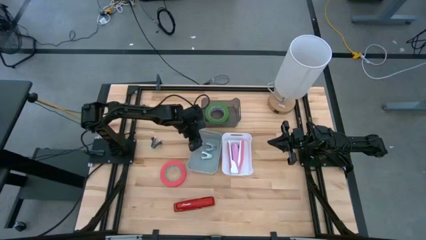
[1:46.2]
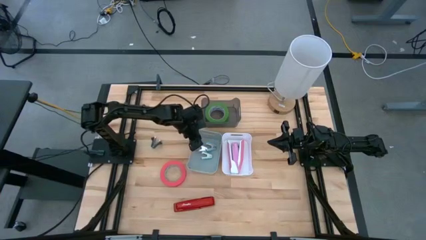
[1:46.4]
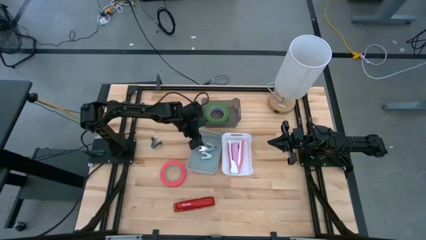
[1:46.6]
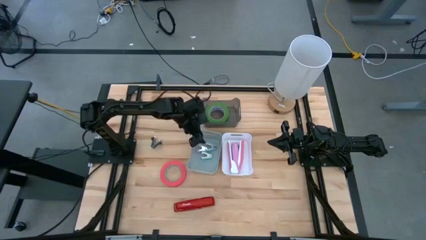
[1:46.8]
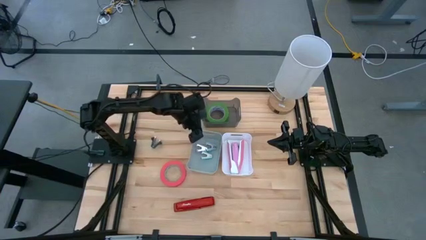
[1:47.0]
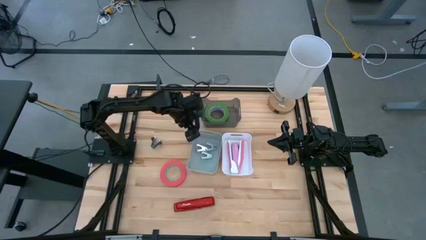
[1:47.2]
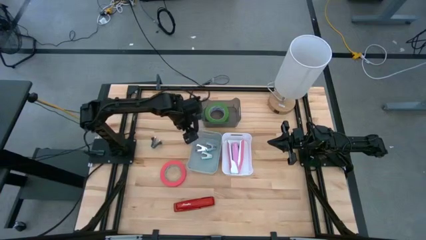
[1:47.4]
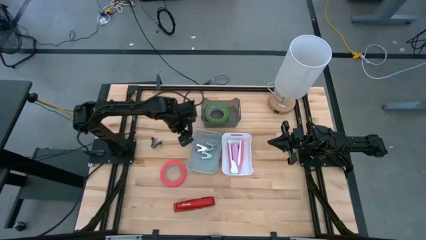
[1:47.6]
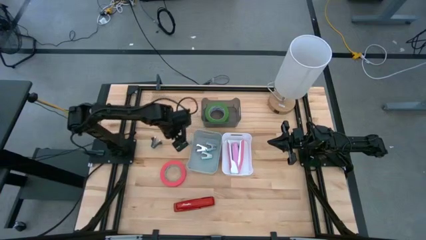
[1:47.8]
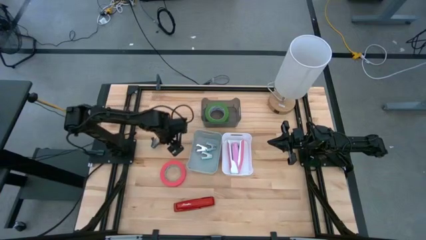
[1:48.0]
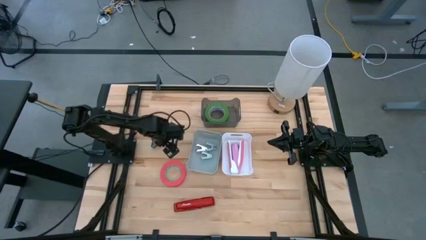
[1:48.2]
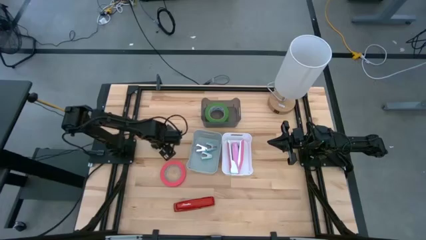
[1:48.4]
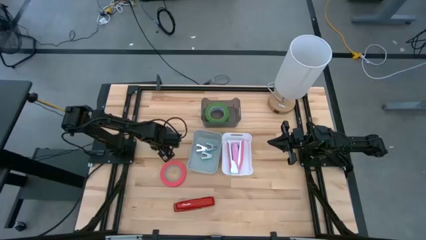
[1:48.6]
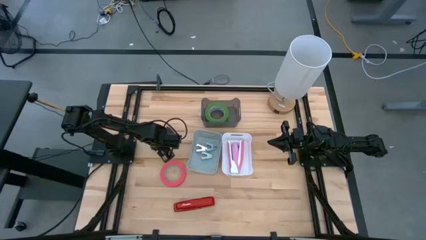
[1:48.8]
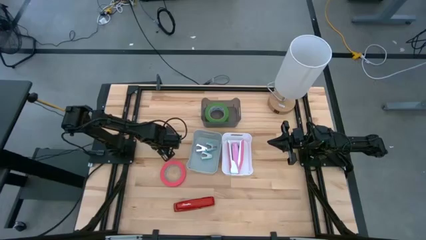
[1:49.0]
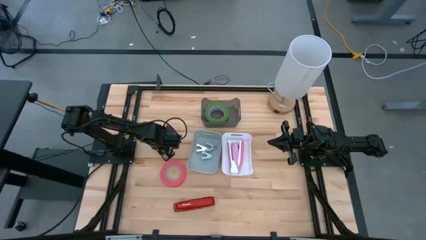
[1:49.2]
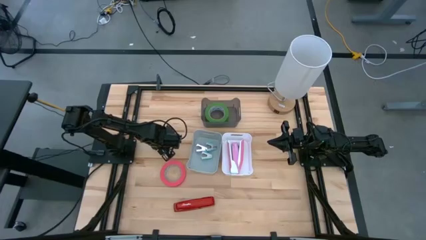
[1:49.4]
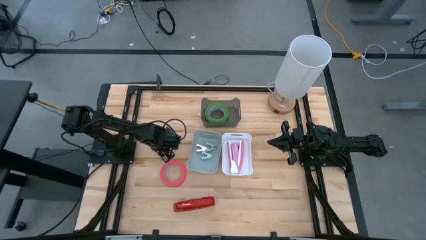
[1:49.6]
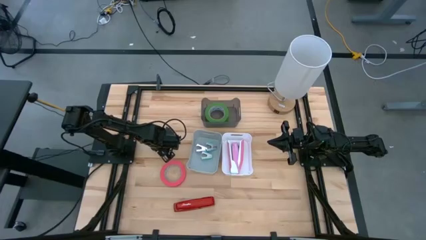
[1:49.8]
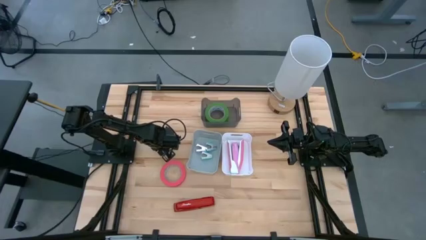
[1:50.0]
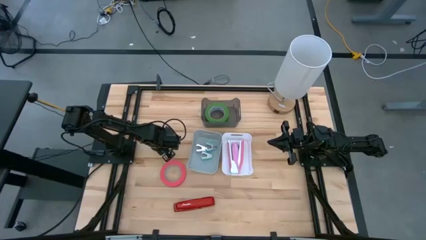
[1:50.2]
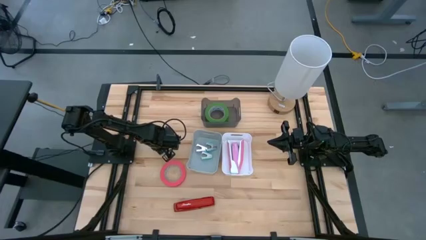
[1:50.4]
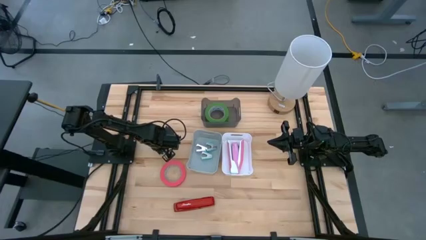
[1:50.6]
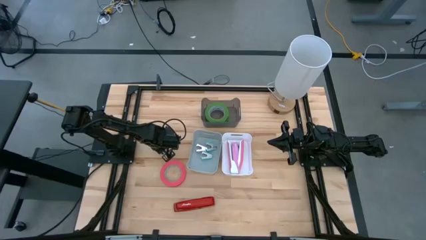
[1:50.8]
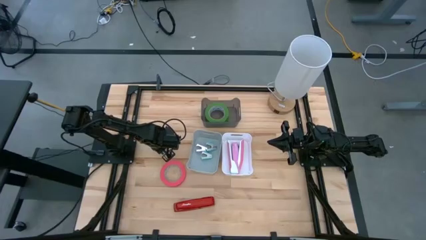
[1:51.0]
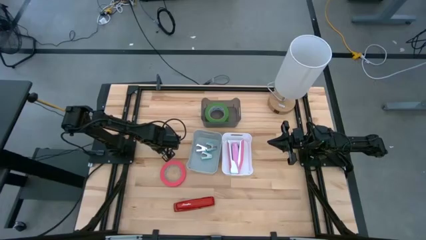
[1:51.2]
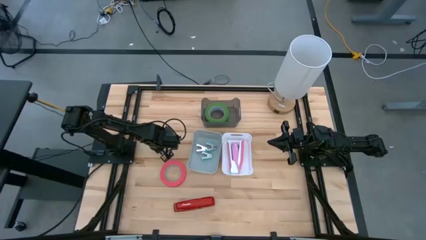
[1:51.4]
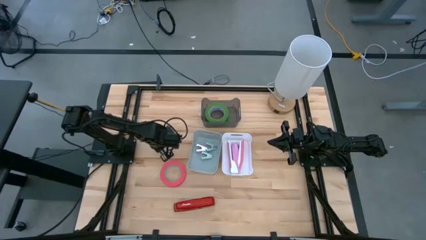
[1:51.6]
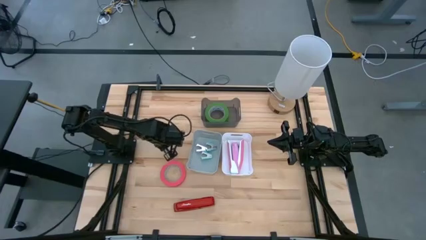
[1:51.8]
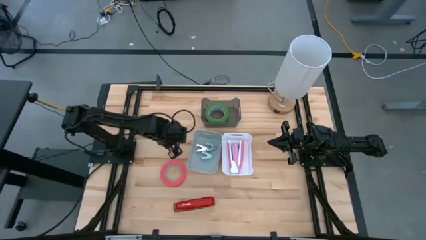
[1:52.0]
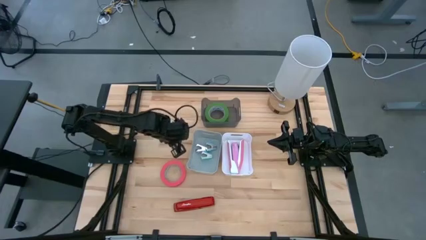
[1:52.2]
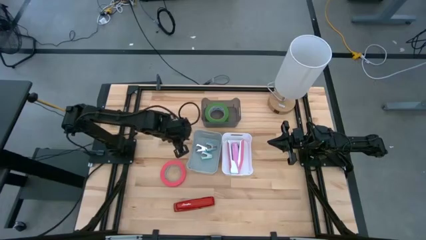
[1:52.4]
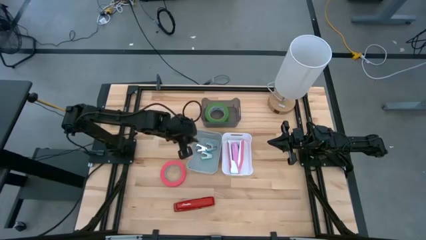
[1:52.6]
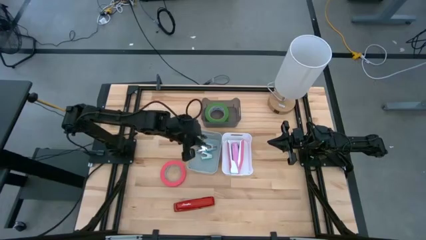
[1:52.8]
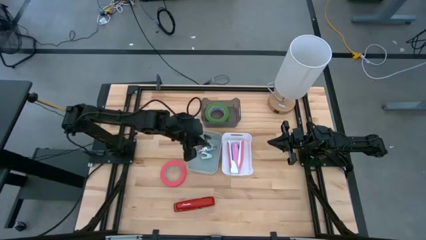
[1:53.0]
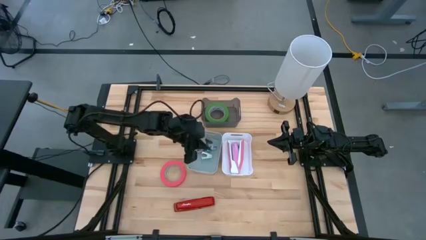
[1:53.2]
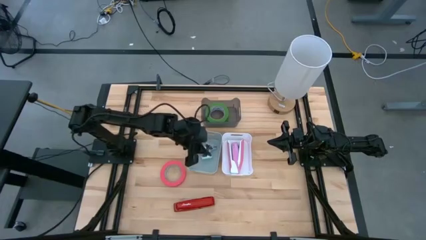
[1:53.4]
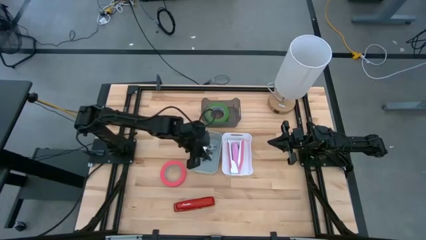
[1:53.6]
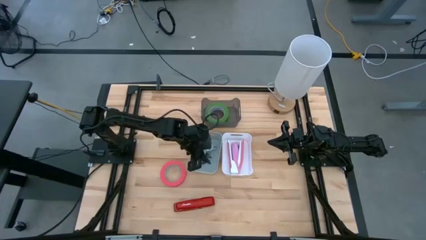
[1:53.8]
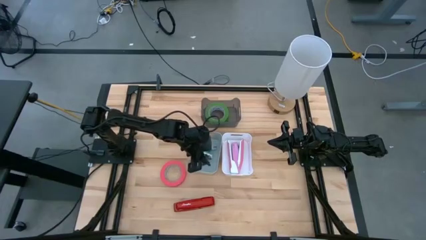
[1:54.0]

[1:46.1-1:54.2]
Task: Pick and place Stapler, Stapler remover, tape
Put the black staple remover in the gray bin

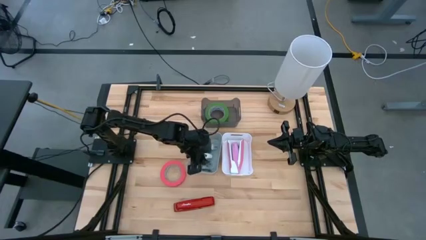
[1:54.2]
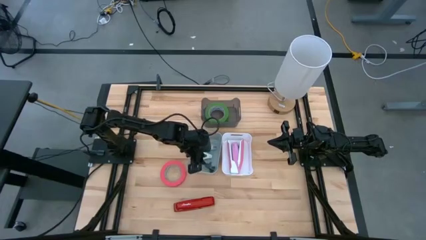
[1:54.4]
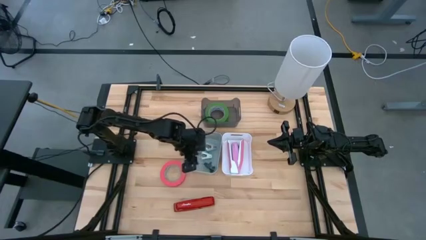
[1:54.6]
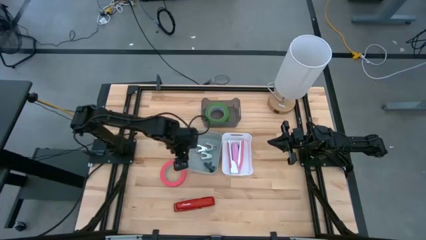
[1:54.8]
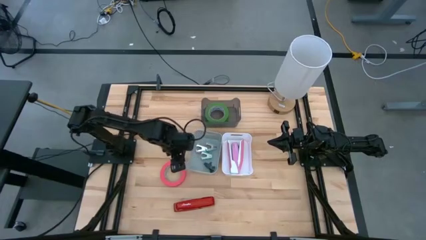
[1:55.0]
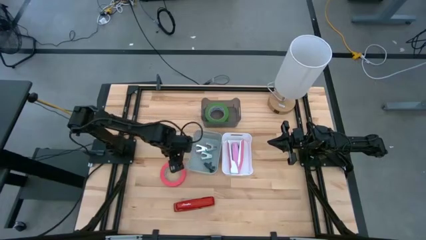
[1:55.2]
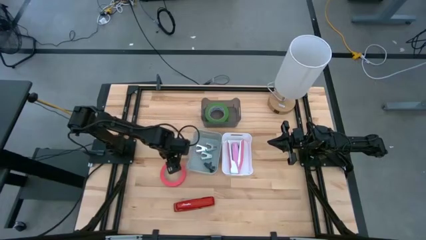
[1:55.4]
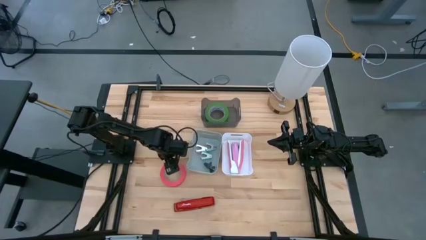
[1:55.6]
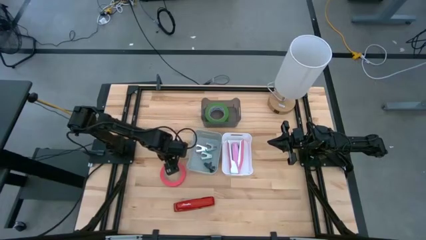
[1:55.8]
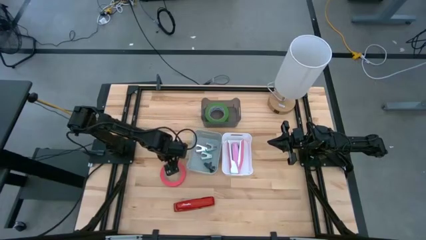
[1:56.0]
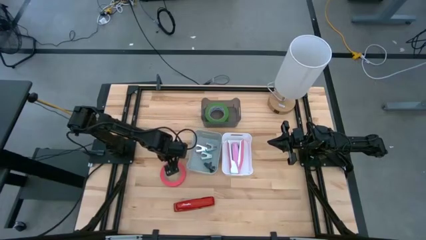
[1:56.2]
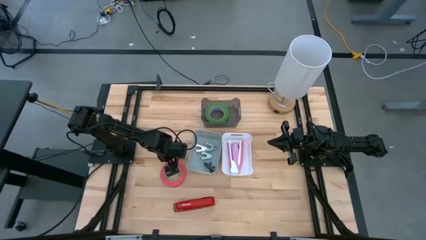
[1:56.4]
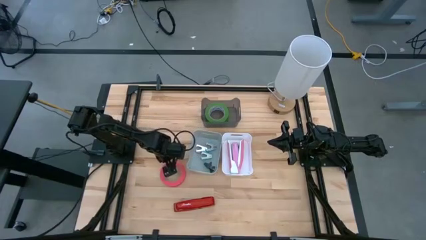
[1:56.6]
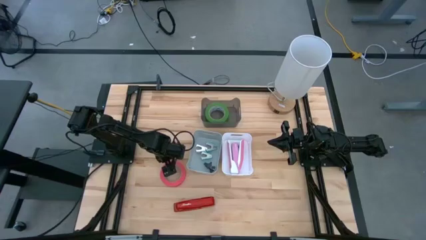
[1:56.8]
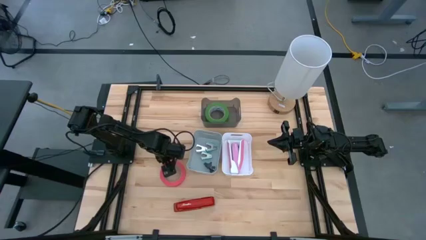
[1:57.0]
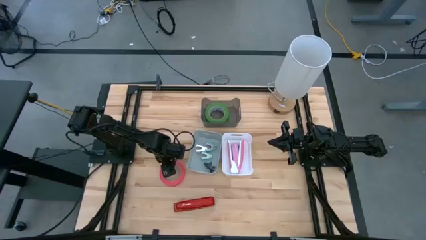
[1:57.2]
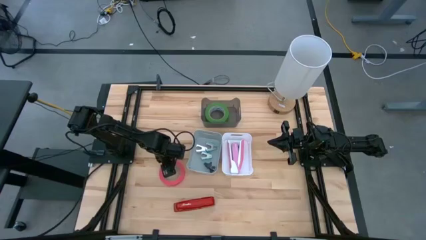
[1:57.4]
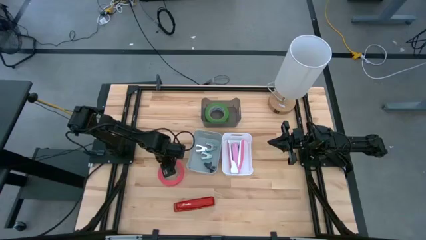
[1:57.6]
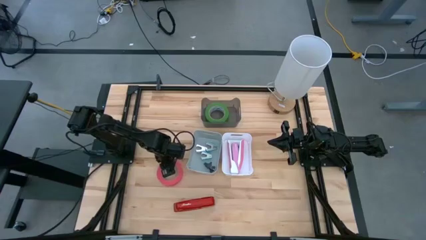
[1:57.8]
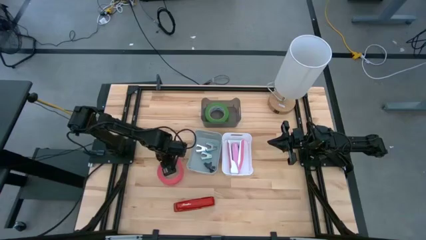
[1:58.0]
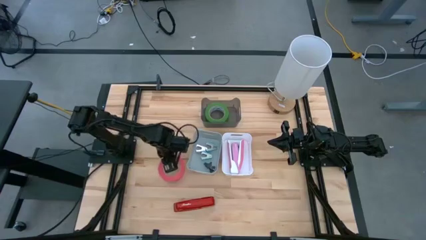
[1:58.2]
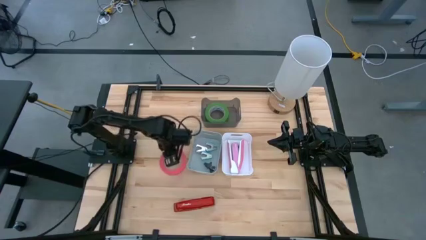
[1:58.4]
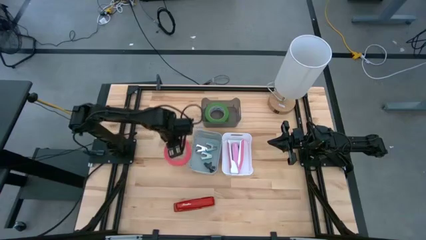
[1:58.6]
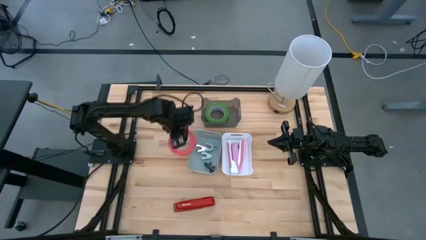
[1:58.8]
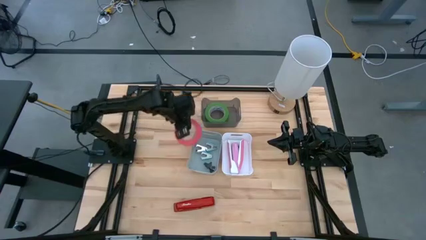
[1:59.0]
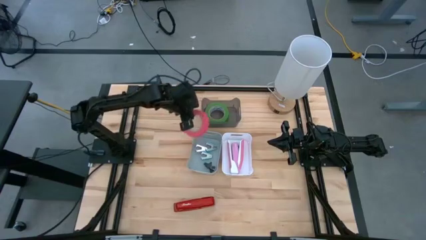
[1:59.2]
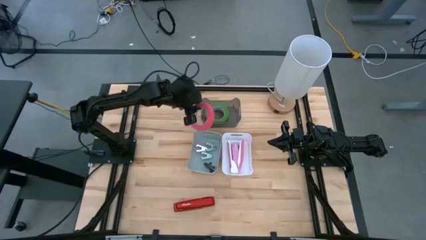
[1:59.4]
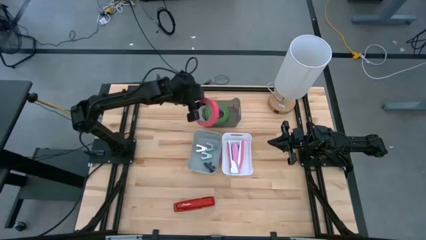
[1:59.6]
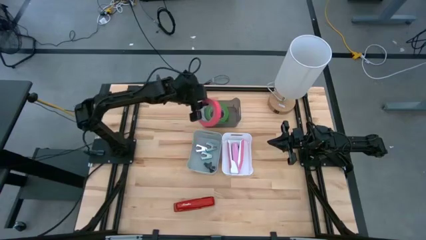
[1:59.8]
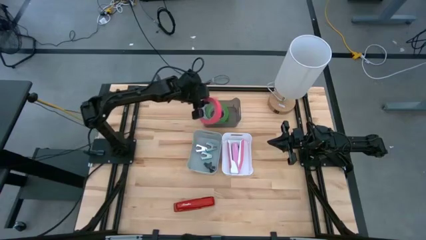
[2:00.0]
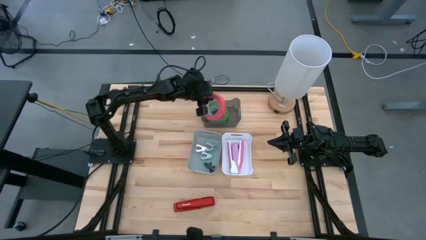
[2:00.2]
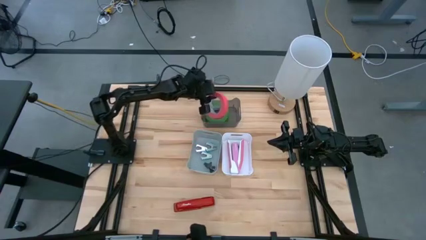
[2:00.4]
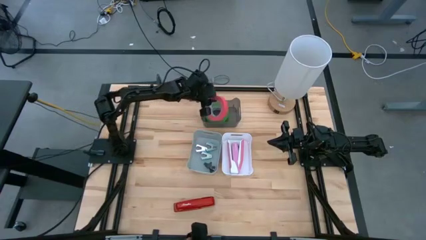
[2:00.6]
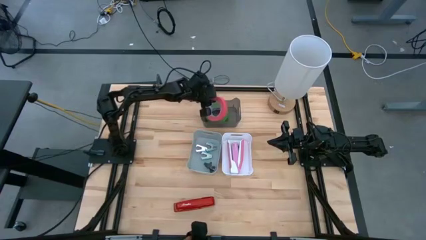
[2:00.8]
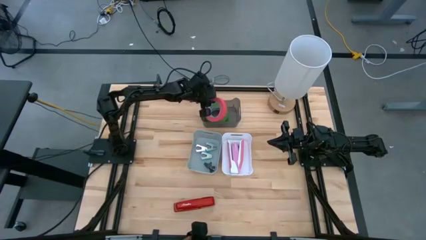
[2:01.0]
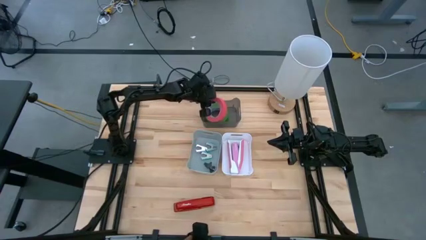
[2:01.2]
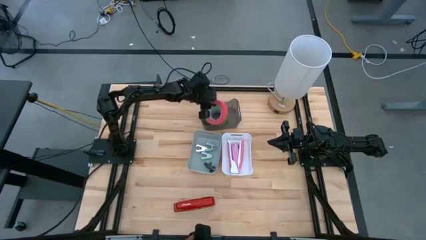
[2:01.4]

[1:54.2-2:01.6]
Put the pink tape in the black bin
